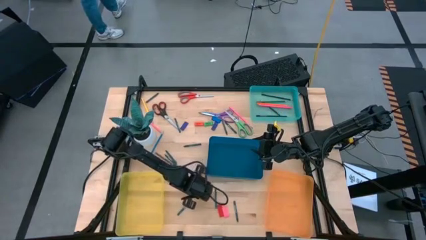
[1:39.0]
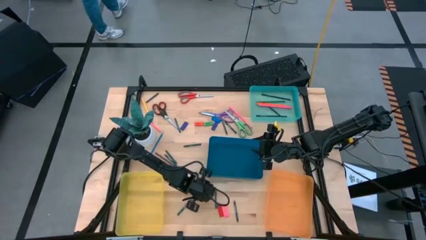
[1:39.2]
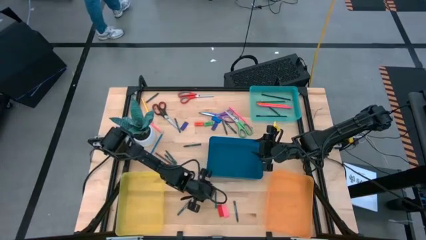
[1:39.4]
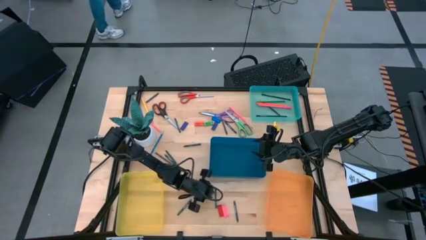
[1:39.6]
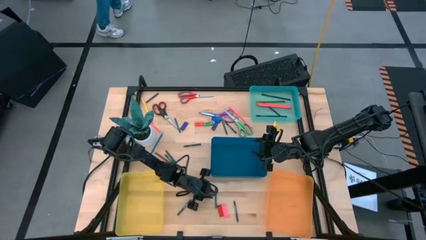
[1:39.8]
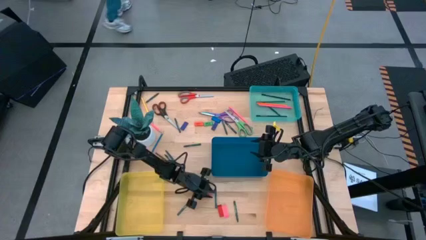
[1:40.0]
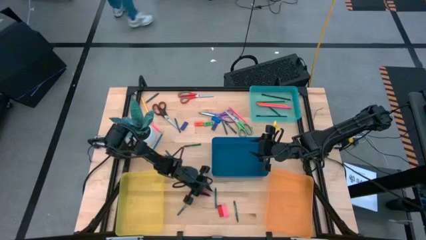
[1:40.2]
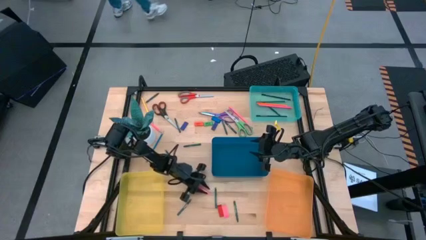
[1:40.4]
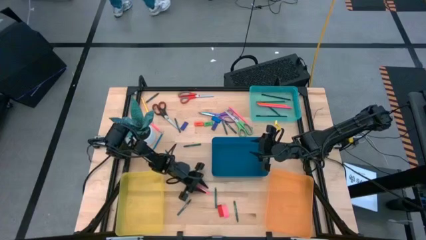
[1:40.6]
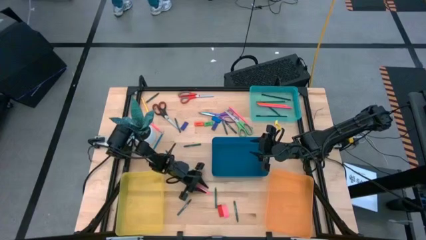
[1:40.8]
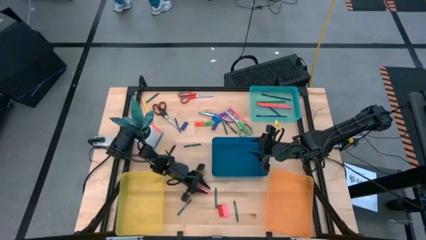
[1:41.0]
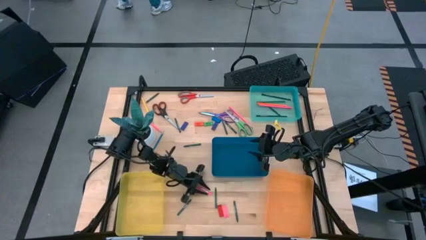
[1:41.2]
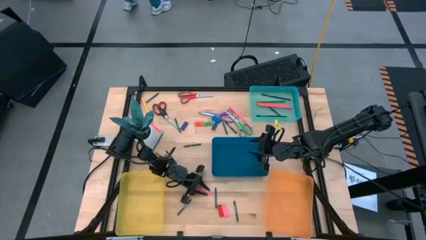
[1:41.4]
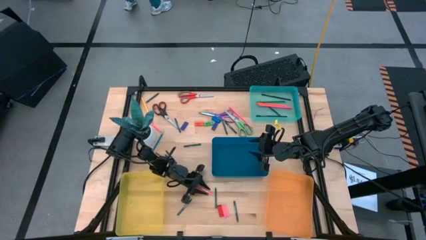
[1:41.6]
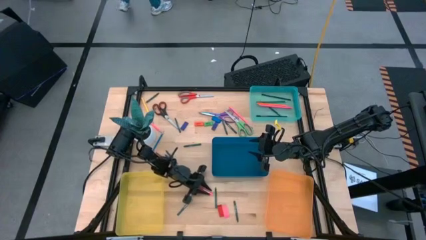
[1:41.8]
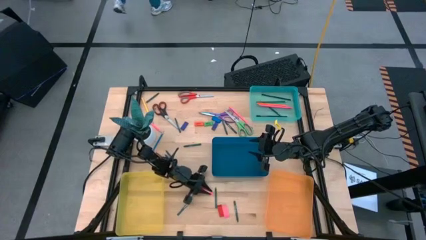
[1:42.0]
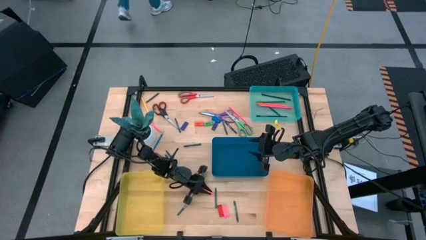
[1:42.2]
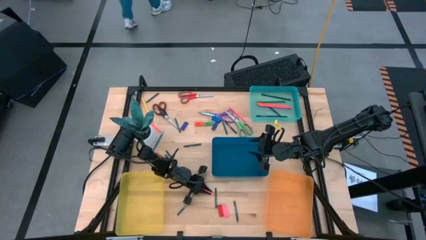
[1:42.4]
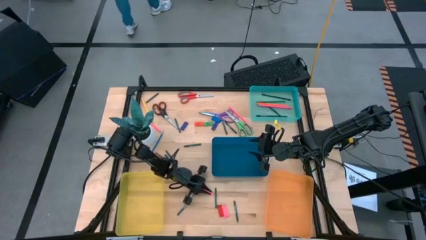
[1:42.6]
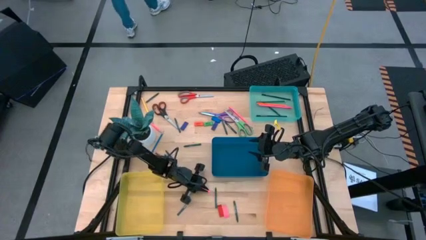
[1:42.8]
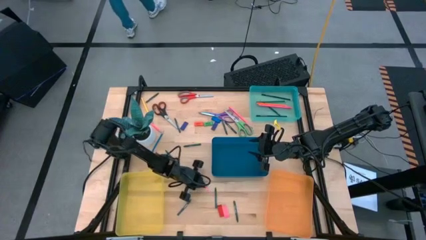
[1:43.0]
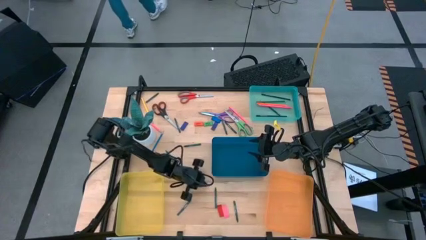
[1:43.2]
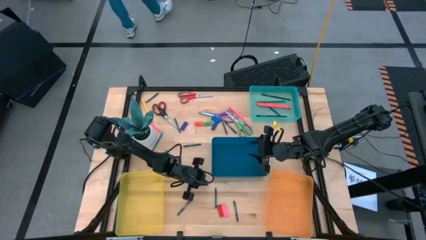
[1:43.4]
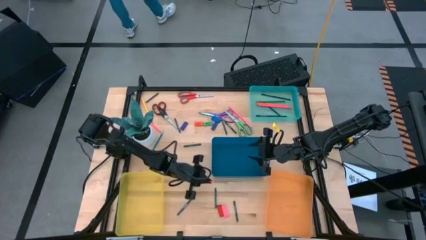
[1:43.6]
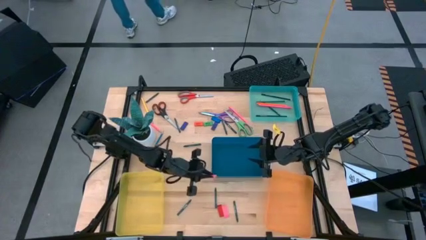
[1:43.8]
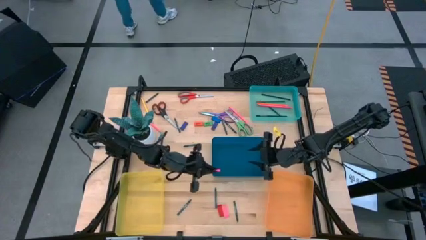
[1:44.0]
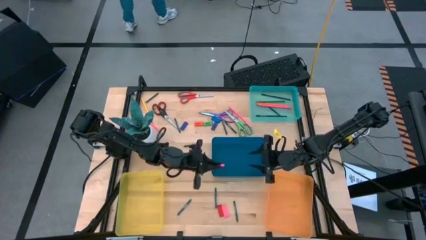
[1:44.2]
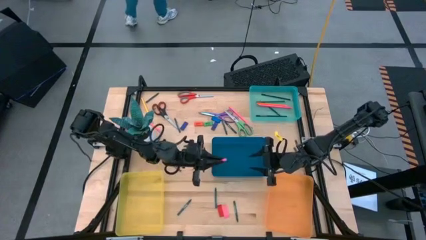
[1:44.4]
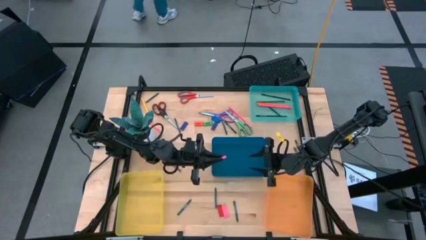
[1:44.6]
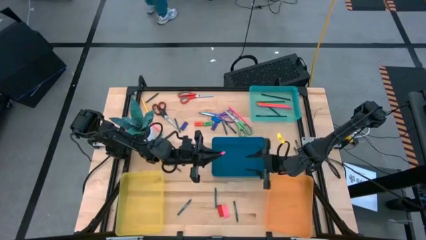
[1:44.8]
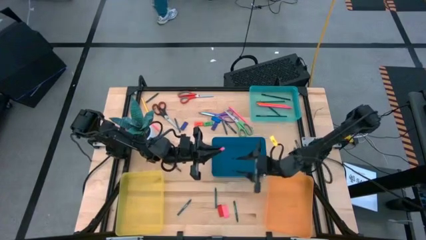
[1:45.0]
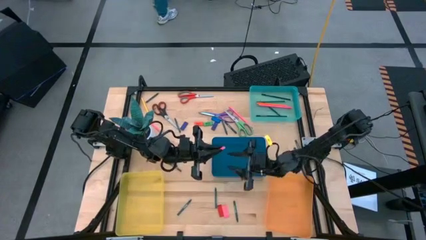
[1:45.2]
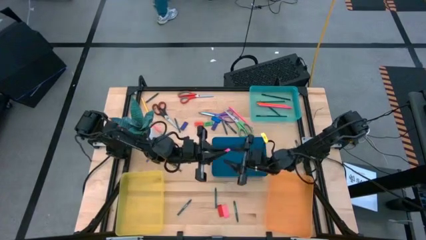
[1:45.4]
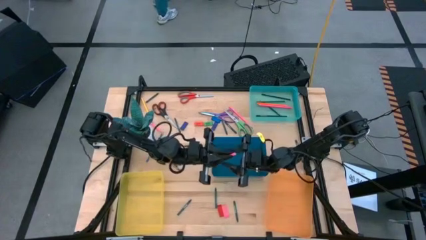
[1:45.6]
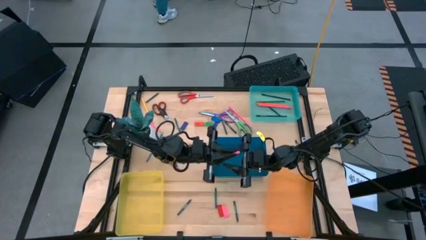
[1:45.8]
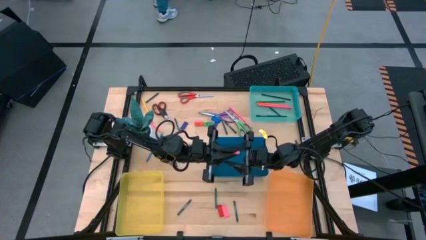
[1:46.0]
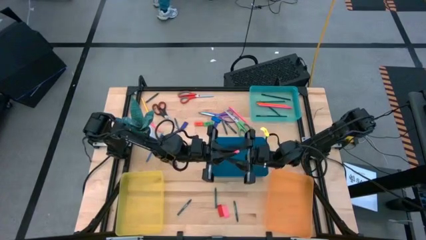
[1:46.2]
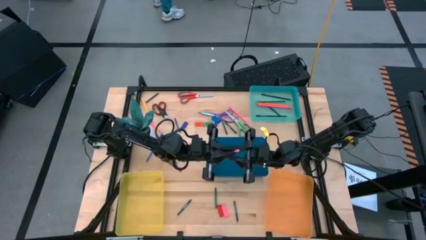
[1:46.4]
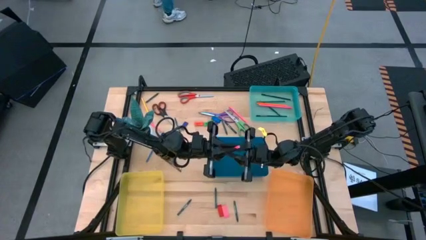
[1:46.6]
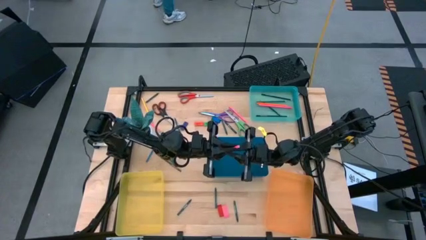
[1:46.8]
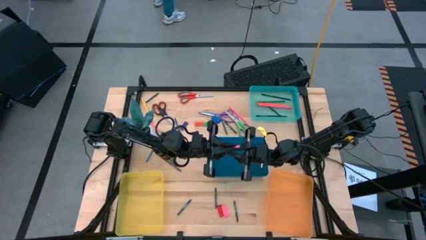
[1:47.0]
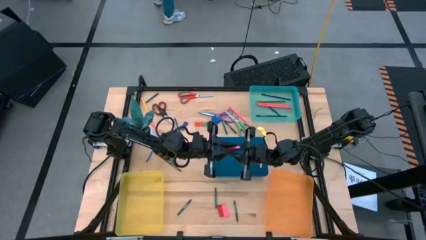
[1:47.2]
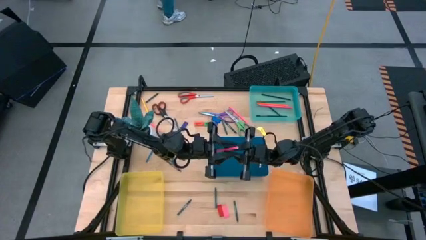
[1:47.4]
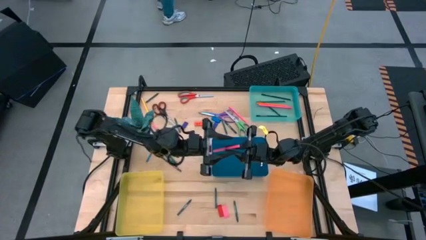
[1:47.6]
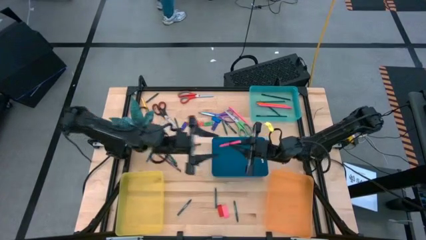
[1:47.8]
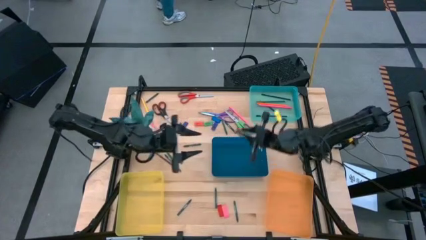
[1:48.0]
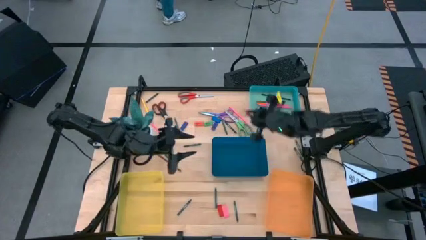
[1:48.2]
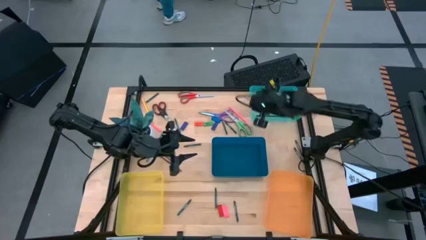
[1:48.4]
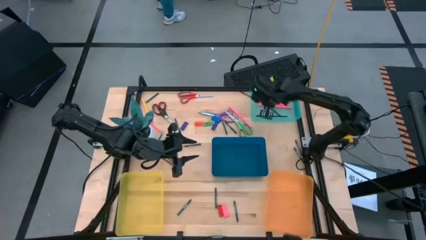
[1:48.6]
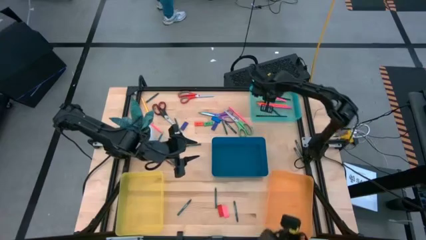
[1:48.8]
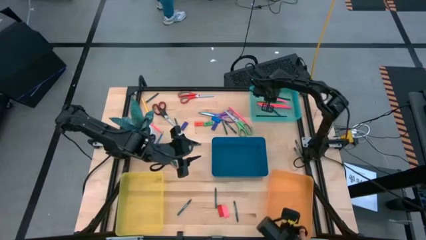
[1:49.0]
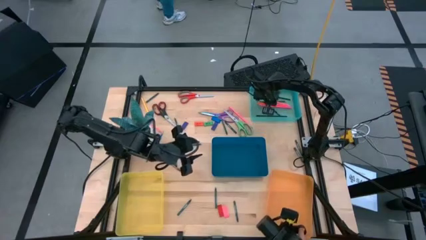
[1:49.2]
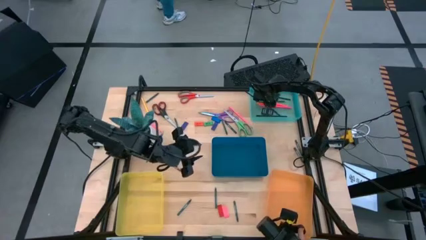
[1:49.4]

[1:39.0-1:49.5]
Task: Sort crayons/erasers/pens/pencils in bins
Put the pink pencil into the green bin

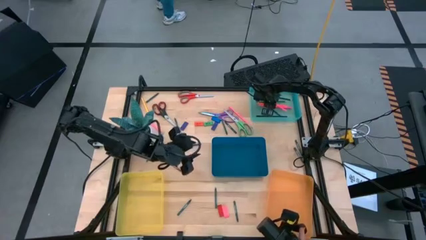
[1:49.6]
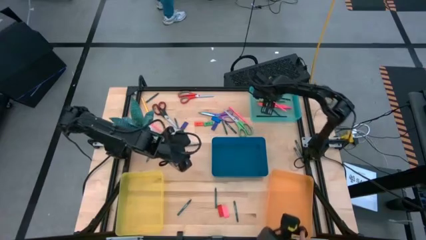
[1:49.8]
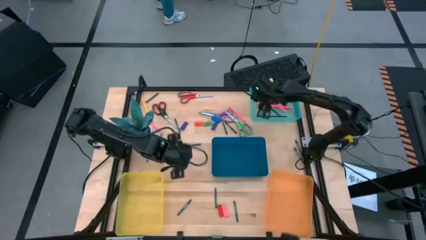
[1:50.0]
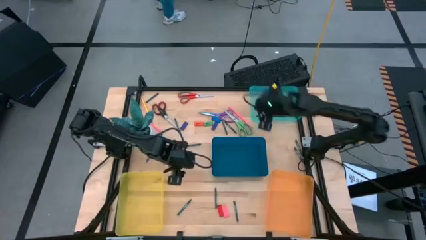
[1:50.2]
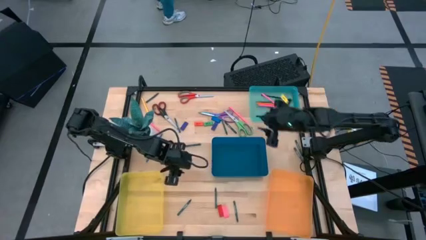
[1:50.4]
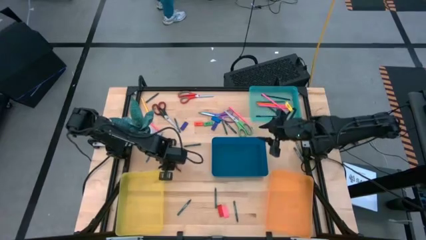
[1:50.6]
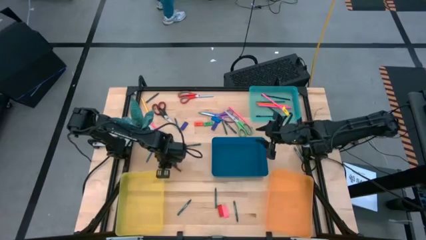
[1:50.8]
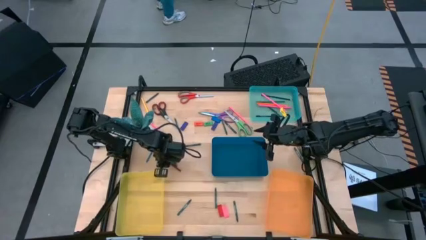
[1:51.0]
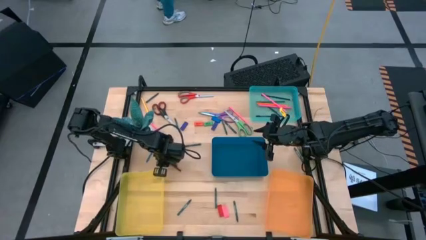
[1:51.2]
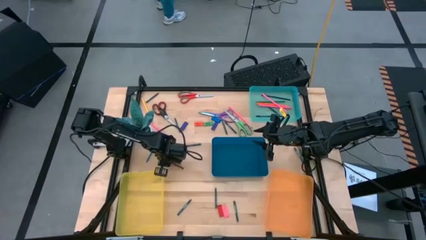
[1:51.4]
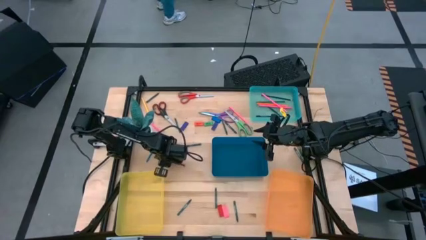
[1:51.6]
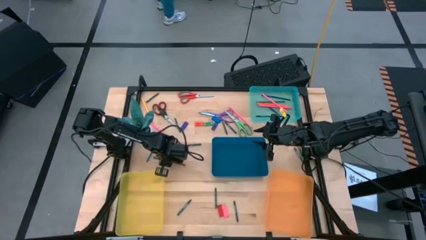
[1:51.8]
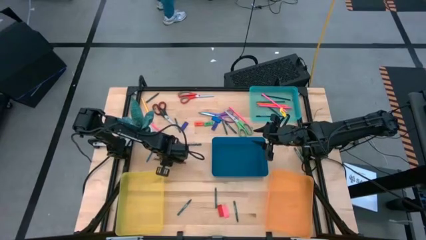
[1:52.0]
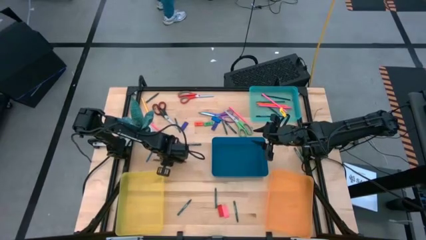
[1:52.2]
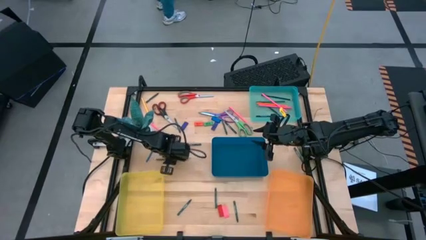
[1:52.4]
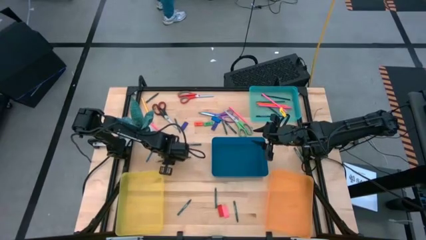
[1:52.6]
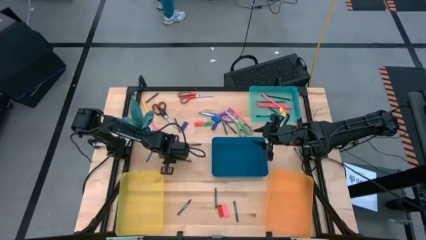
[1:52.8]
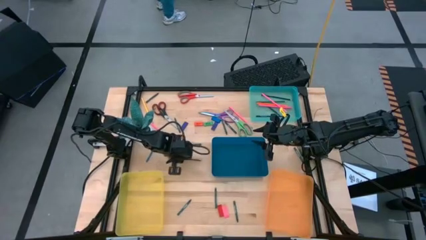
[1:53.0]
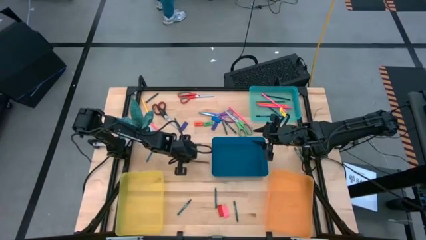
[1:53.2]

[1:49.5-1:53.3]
Put the brown pencil into the green bin
